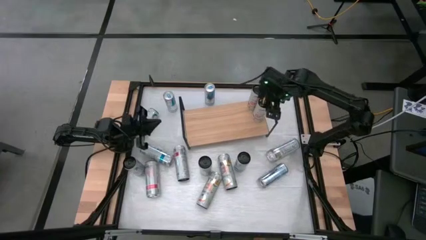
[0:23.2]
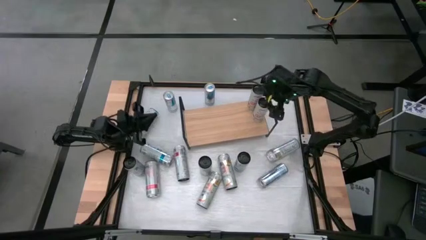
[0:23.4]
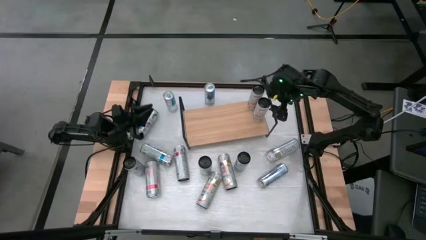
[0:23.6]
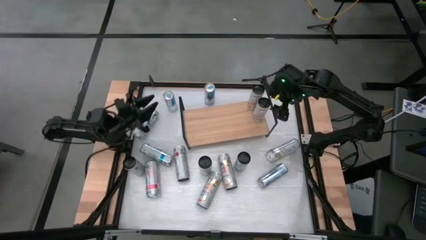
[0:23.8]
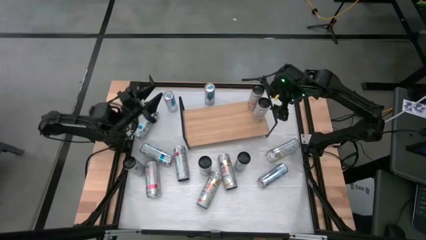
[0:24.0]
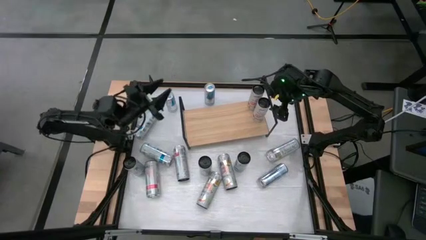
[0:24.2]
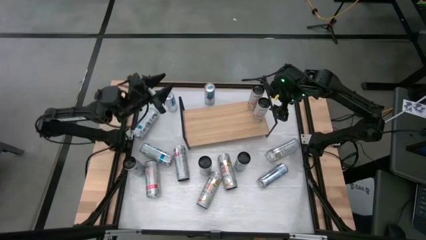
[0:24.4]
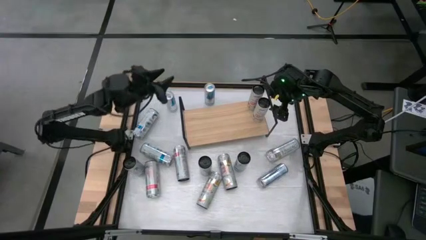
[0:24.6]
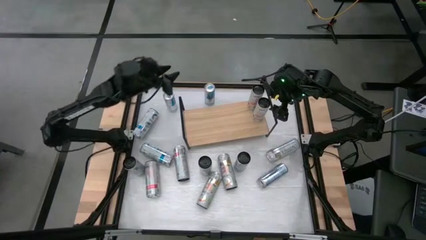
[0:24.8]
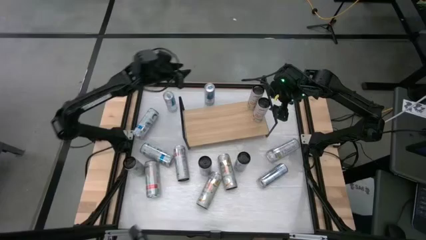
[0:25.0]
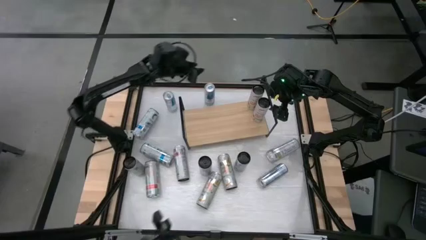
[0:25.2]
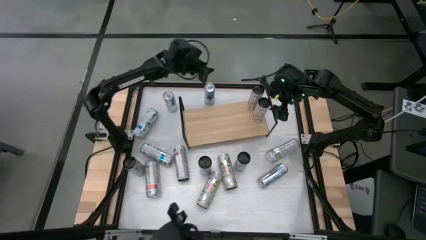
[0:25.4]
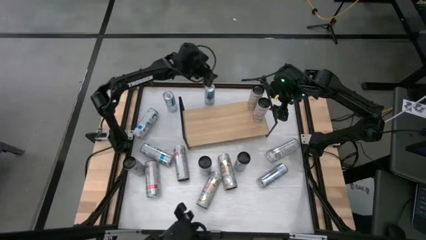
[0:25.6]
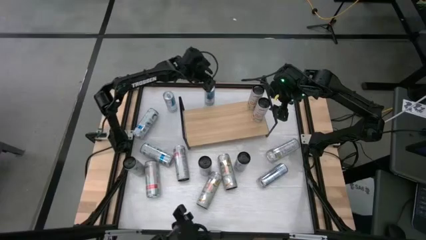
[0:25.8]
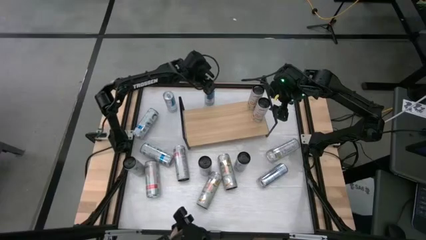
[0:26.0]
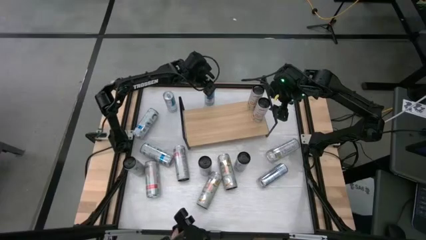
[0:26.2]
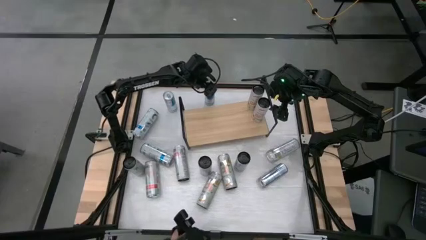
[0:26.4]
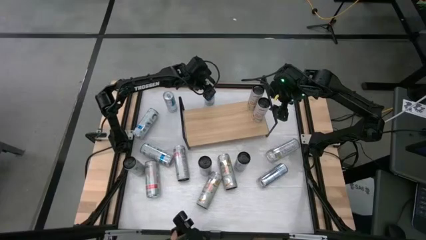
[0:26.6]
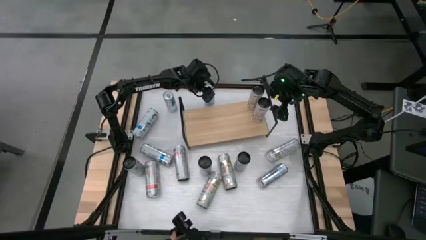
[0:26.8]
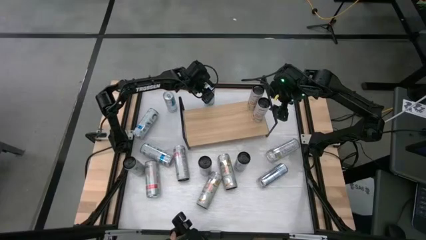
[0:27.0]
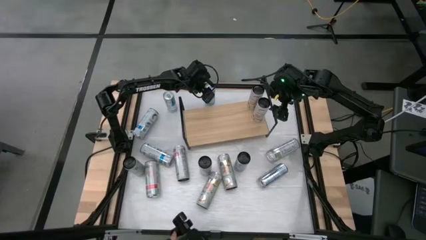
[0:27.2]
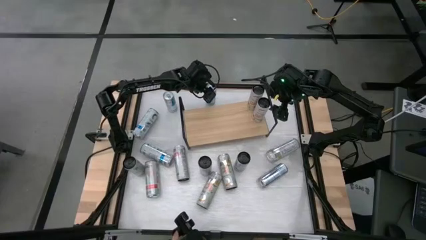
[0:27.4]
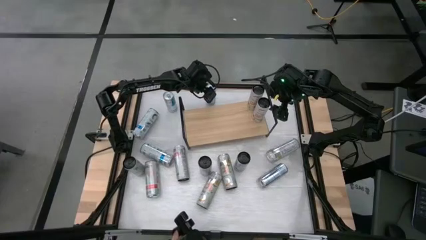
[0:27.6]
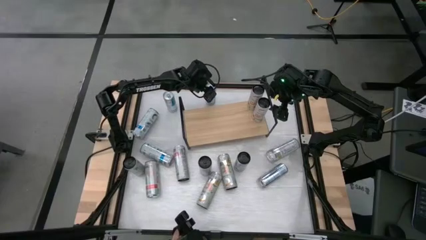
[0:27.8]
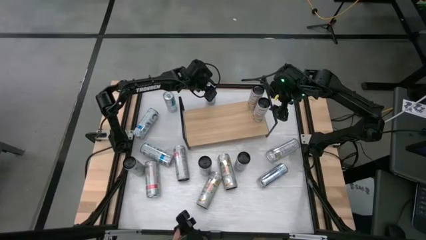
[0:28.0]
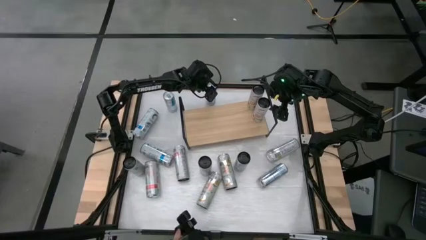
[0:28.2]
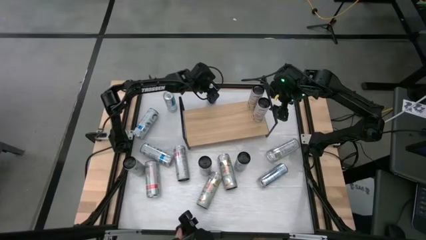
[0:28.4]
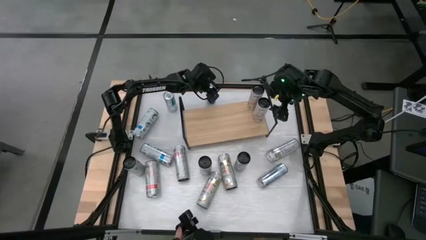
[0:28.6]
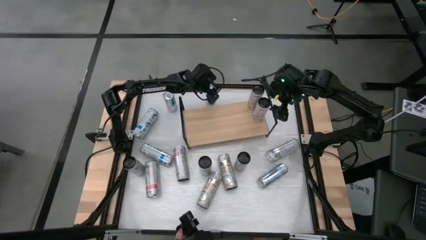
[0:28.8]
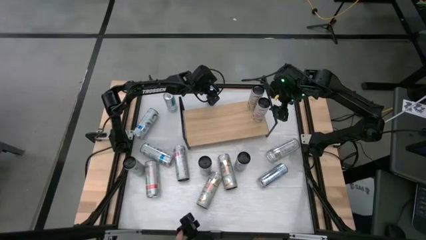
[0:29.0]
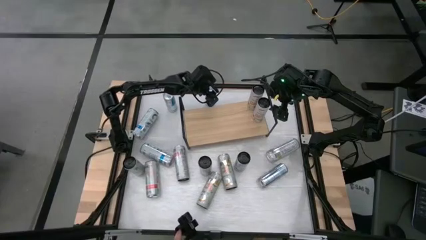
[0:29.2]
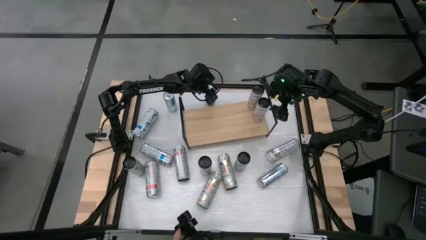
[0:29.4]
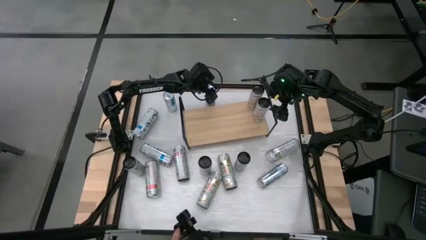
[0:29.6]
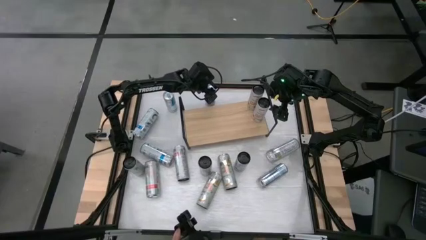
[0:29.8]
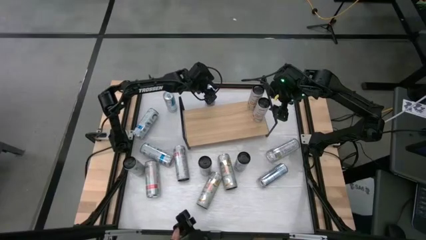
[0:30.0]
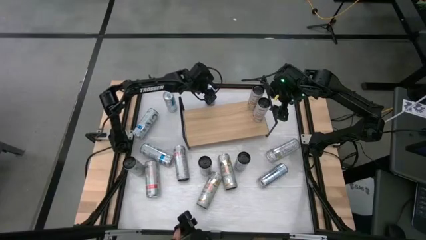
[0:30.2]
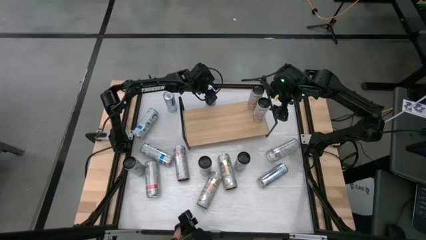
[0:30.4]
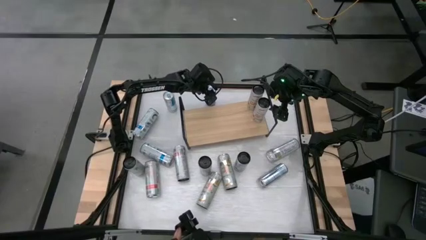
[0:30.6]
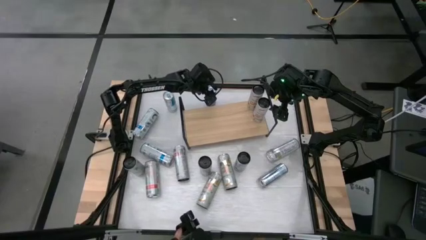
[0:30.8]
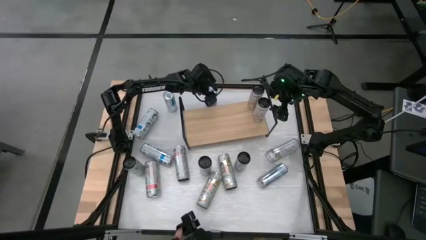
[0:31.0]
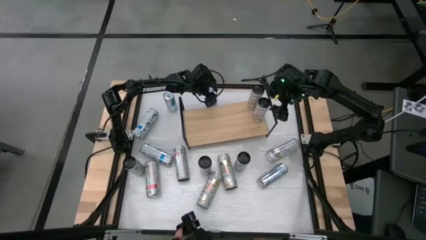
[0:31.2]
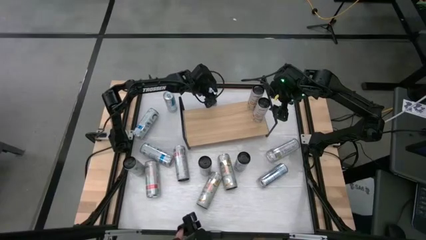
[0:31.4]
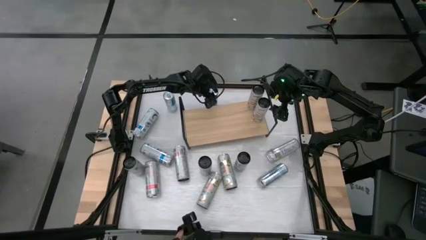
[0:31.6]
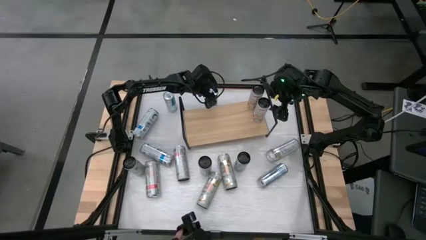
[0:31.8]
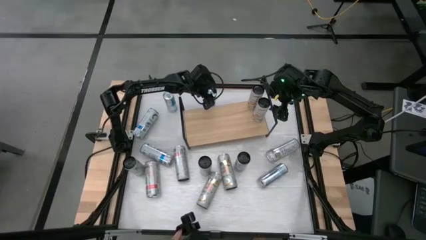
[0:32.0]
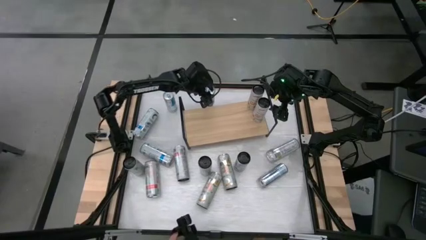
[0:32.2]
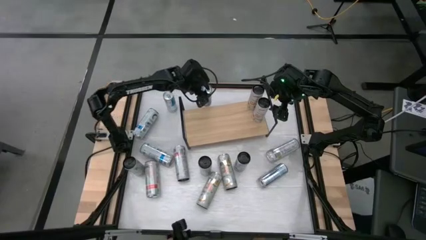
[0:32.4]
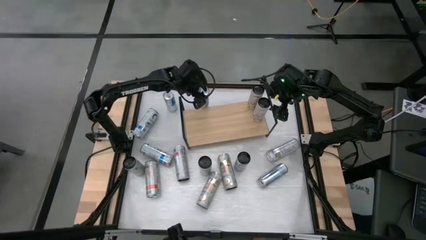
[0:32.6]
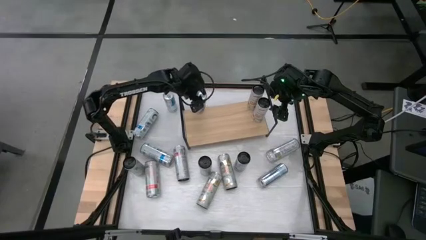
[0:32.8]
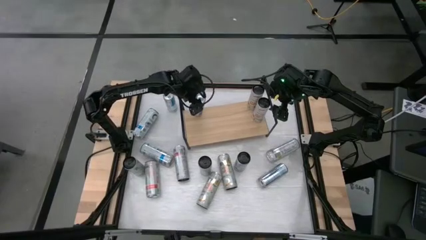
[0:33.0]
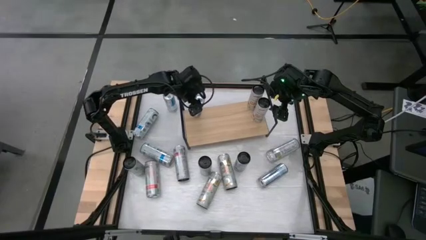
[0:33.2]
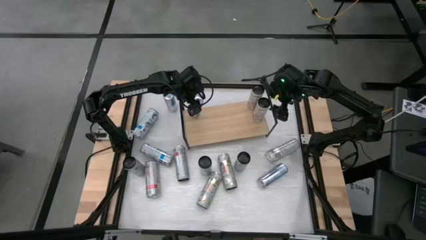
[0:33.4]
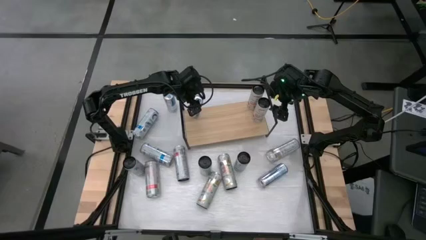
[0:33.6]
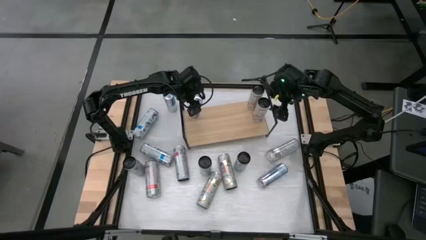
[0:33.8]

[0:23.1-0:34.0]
Task: Place canned beverage on shelf
Put the blue soda can on the shelf

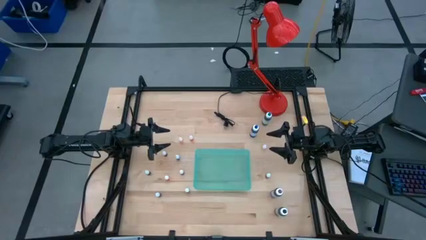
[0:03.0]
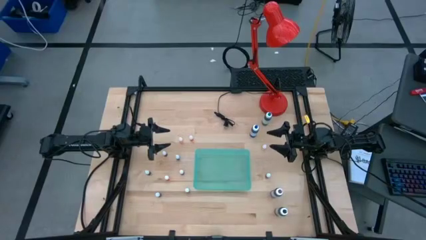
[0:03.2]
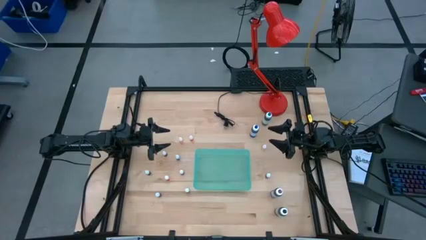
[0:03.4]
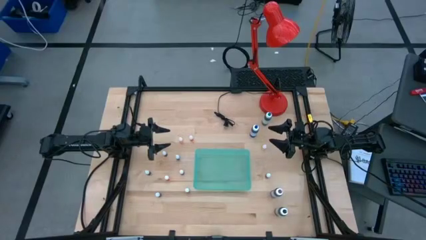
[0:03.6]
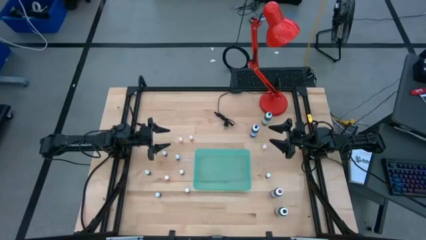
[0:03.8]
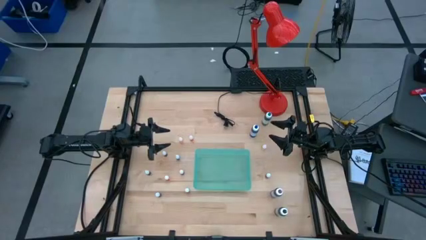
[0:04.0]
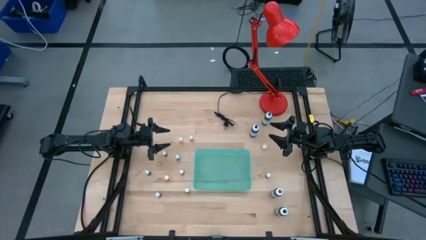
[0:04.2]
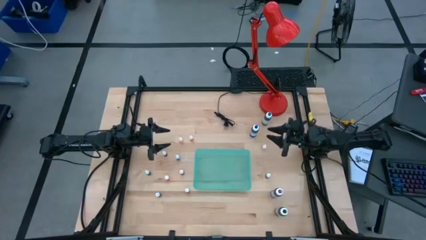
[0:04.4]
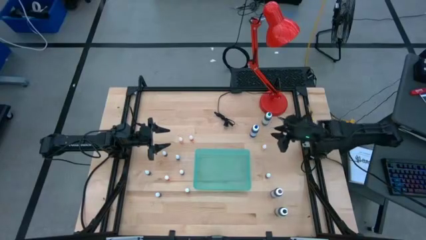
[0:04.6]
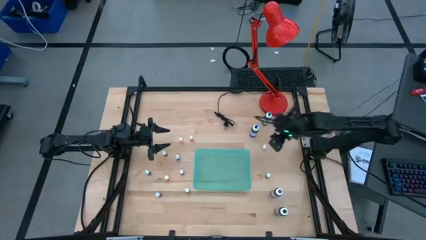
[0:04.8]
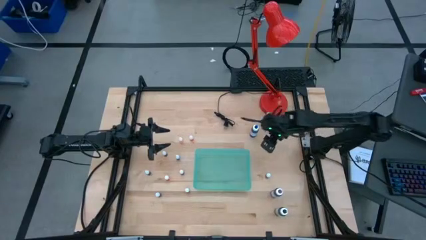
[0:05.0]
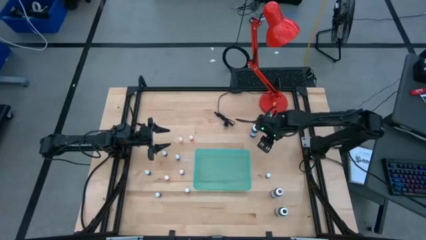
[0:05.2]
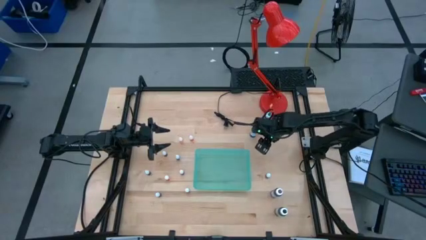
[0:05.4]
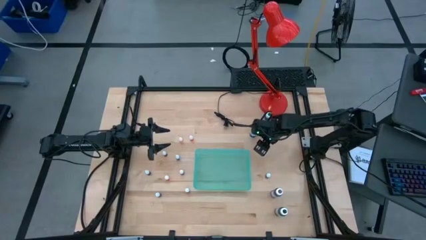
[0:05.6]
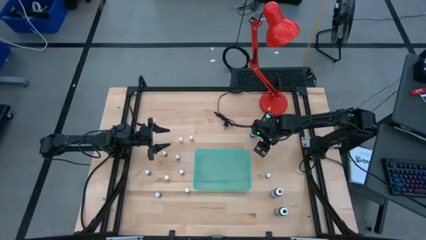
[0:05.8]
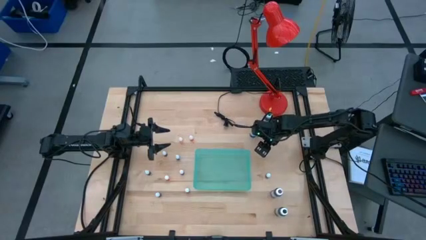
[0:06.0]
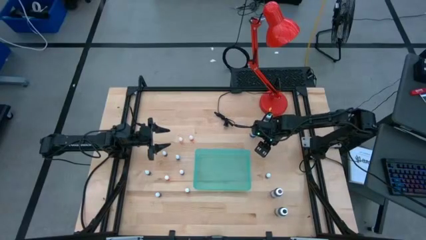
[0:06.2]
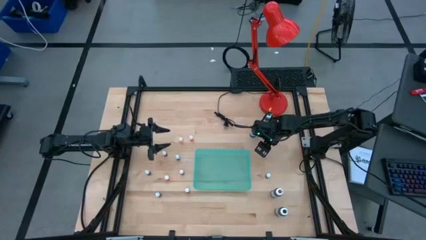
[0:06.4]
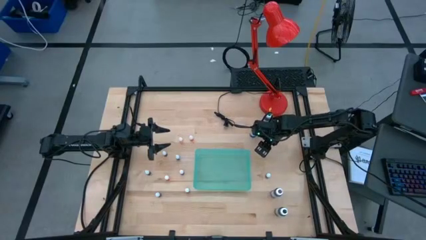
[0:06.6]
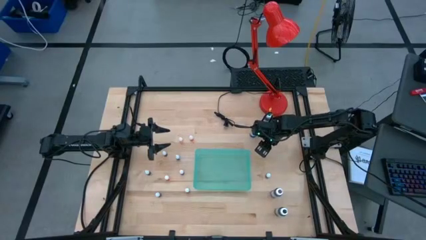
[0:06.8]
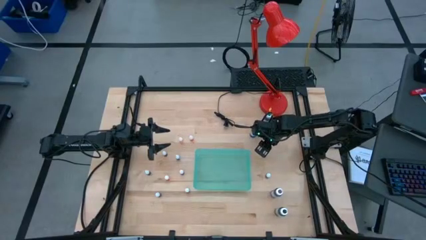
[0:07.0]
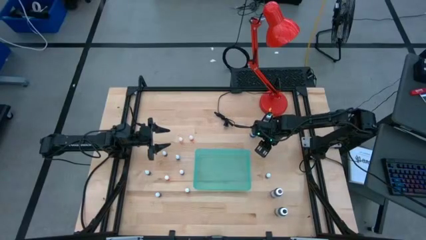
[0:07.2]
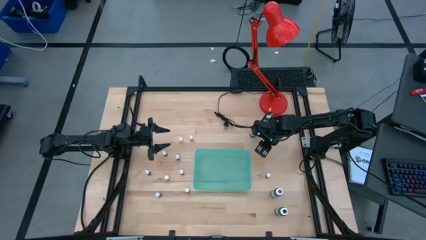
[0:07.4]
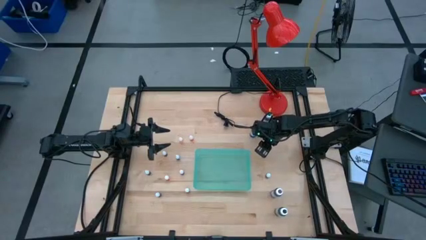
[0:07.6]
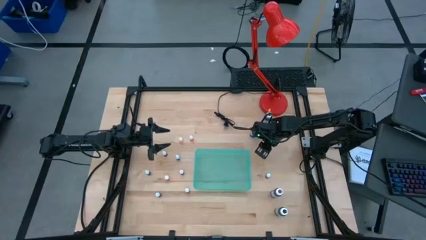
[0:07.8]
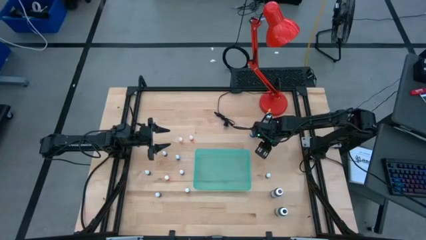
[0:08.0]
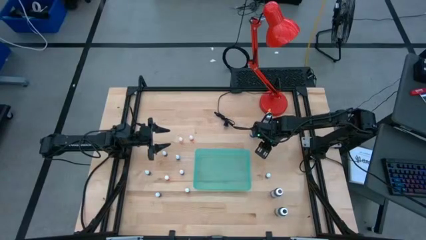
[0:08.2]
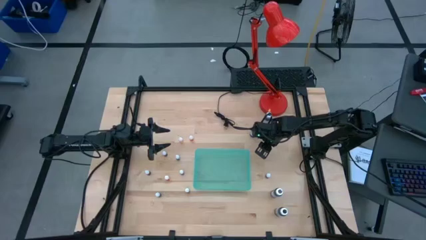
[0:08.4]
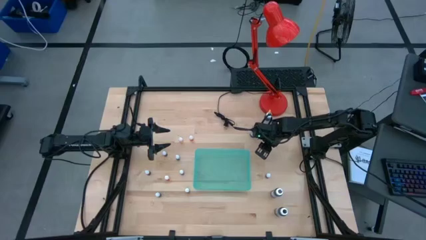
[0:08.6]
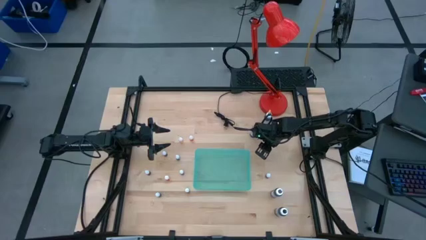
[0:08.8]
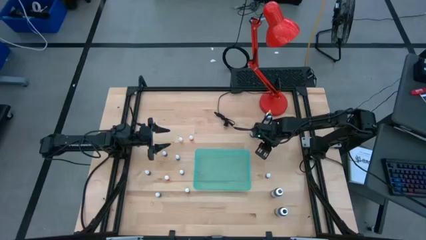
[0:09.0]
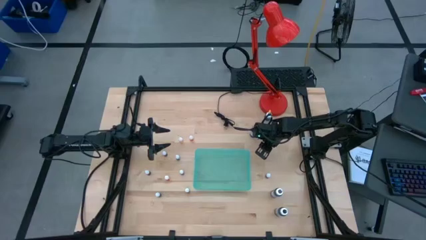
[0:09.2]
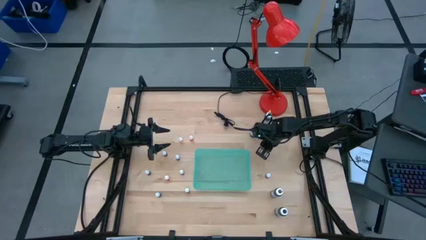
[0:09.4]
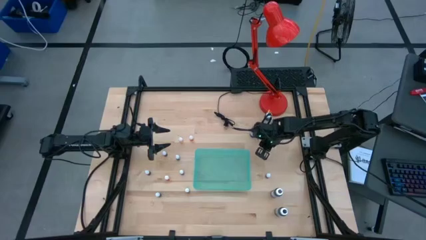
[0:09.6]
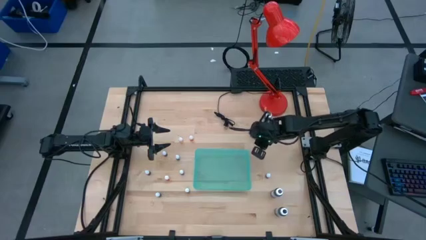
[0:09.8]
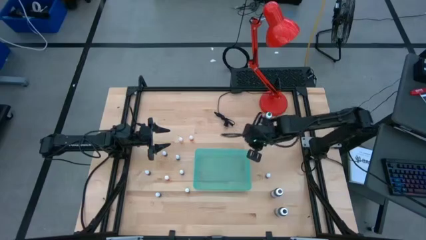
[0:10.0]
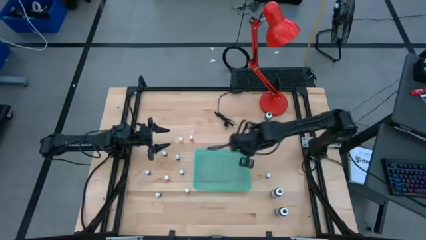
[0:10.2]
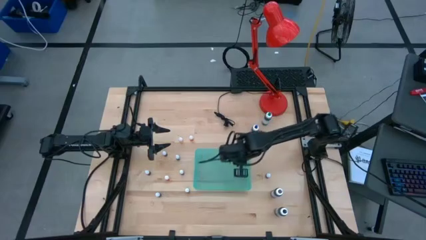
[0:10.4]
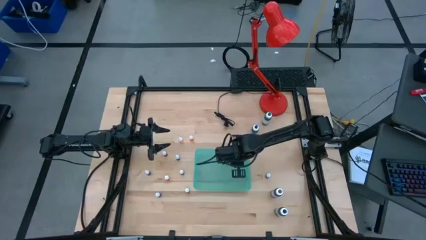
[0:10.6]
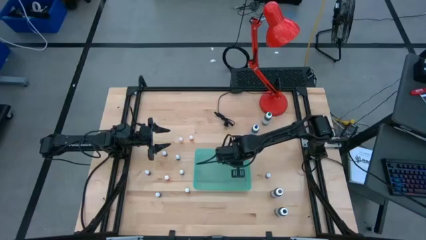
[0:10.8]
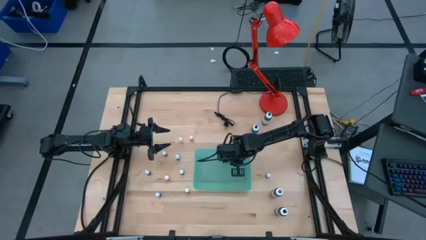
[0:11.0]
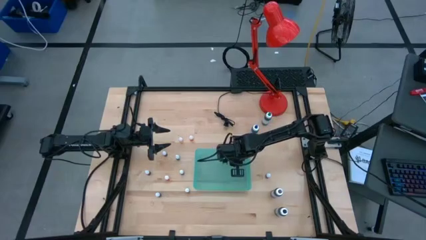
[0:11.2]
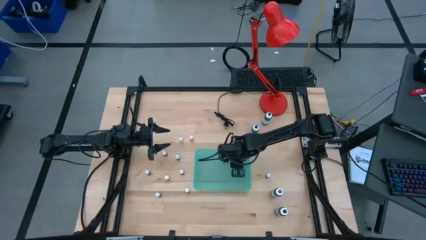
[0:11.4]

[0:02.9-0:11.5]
Task: Pick & Place food coloring
Put the small yellow food coloring bottle into the light blue bin
